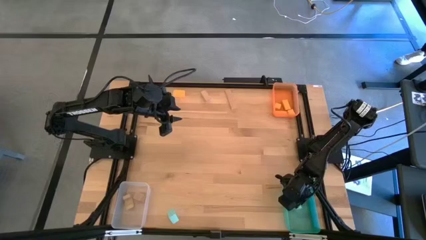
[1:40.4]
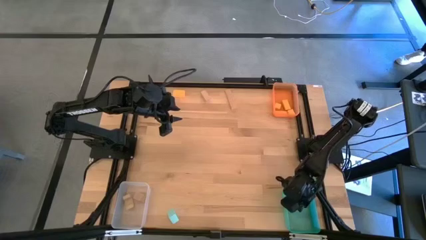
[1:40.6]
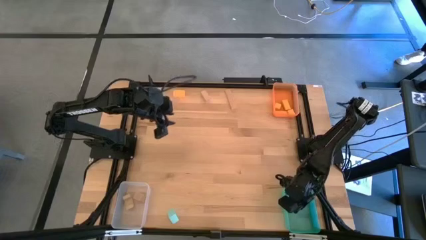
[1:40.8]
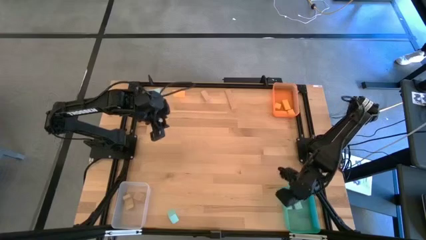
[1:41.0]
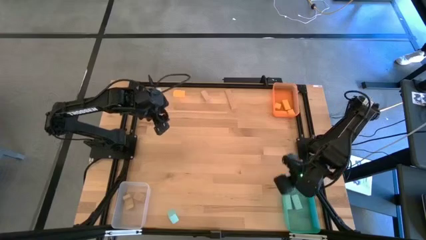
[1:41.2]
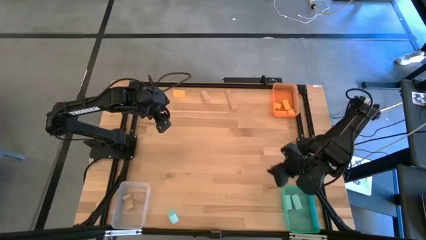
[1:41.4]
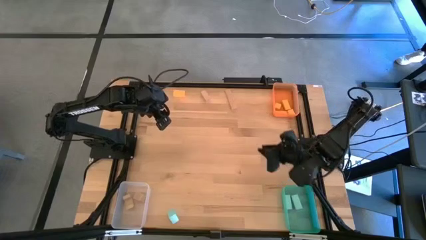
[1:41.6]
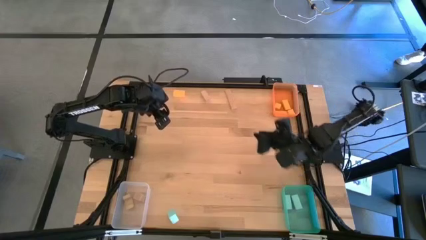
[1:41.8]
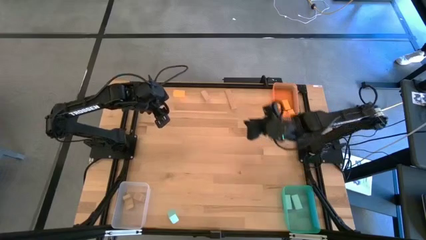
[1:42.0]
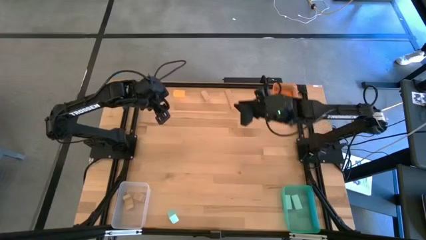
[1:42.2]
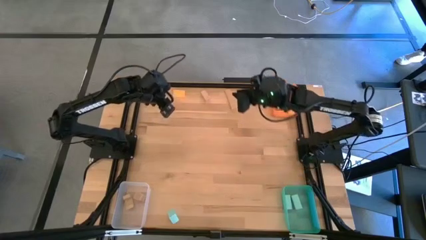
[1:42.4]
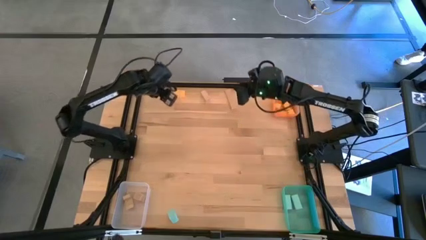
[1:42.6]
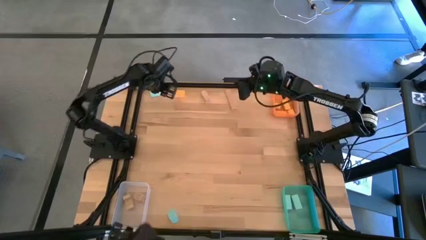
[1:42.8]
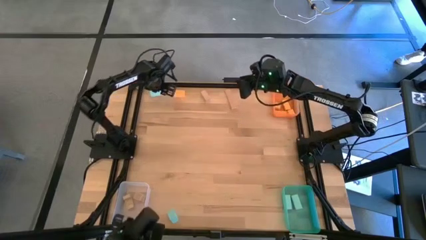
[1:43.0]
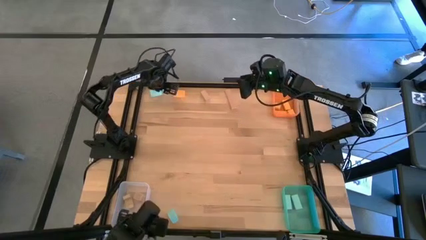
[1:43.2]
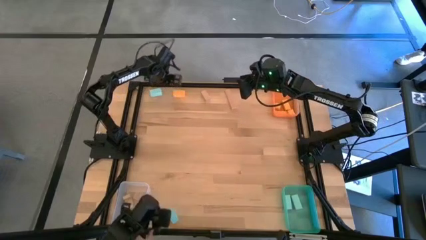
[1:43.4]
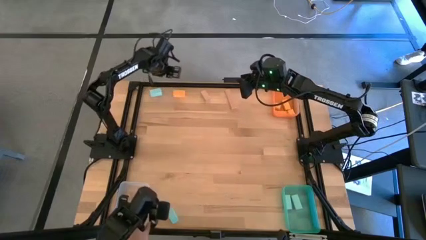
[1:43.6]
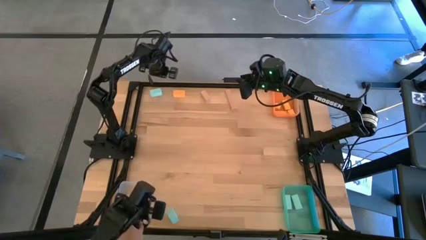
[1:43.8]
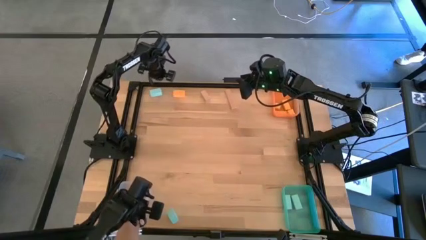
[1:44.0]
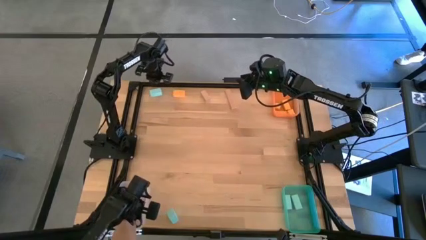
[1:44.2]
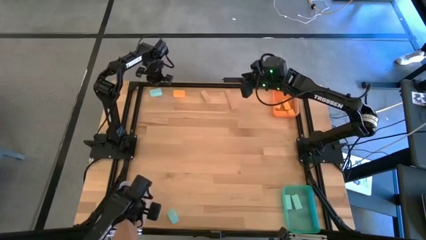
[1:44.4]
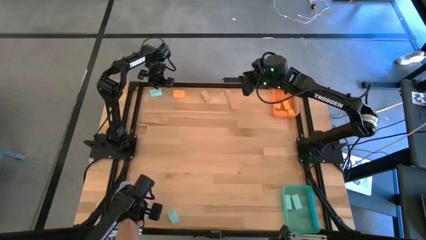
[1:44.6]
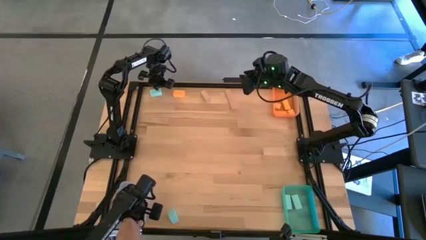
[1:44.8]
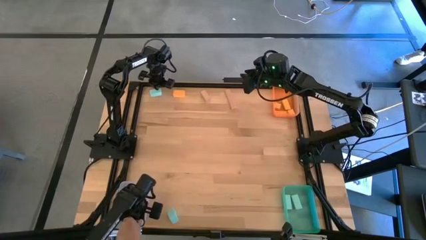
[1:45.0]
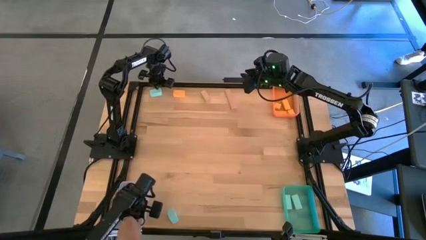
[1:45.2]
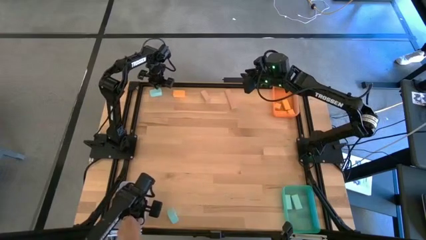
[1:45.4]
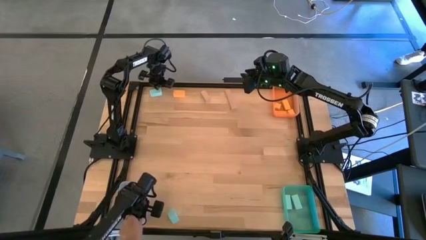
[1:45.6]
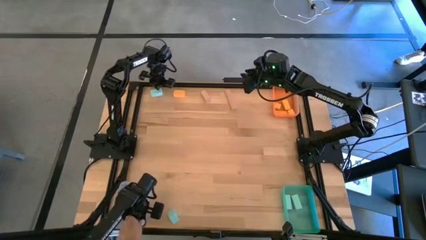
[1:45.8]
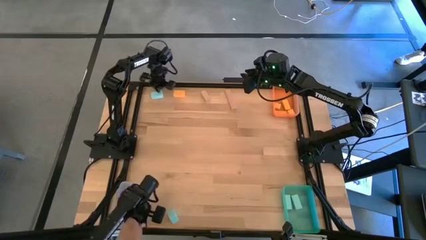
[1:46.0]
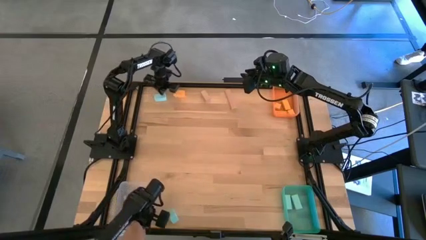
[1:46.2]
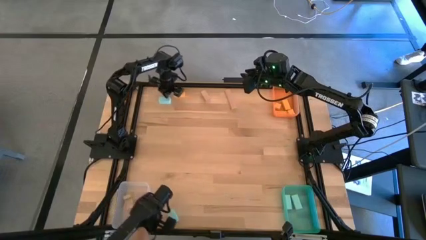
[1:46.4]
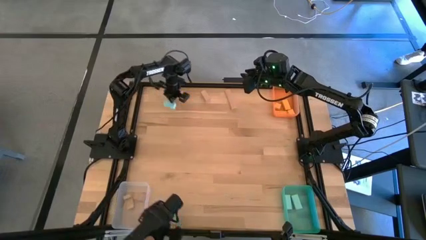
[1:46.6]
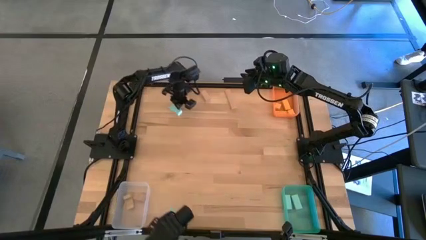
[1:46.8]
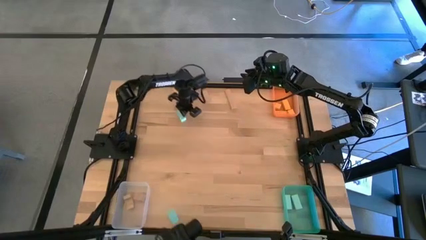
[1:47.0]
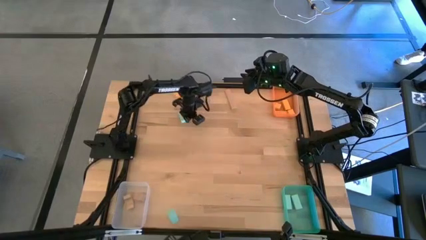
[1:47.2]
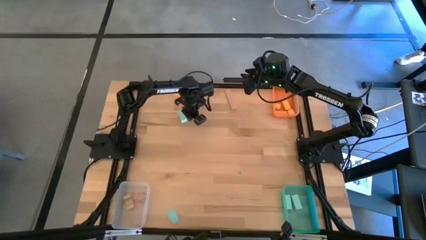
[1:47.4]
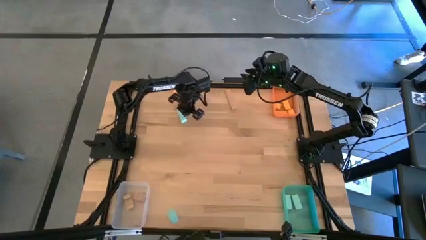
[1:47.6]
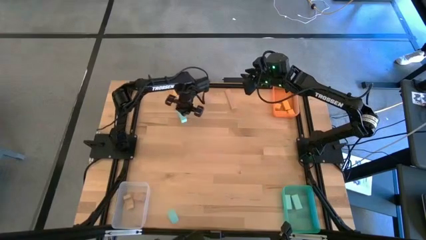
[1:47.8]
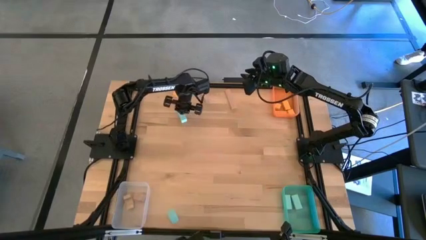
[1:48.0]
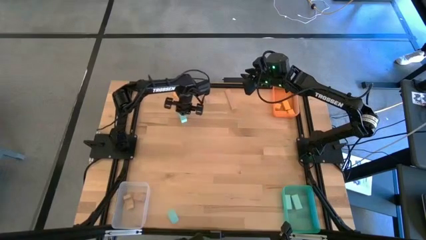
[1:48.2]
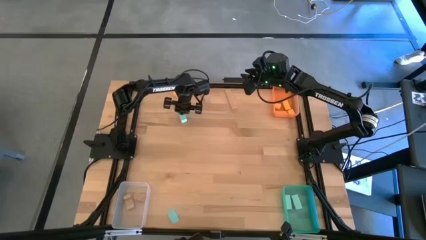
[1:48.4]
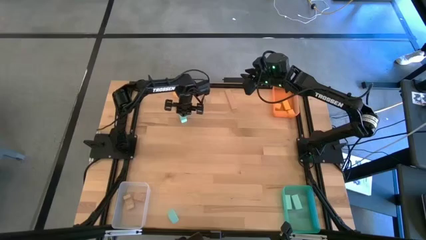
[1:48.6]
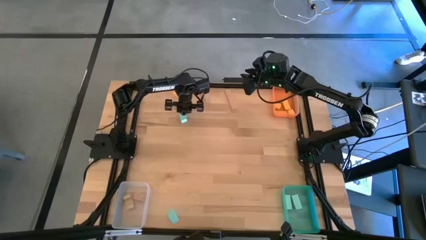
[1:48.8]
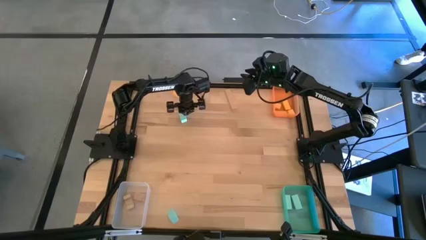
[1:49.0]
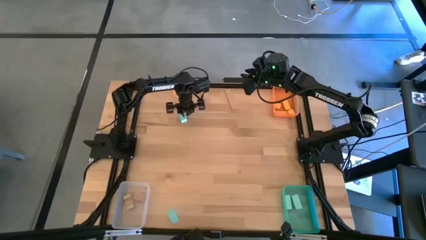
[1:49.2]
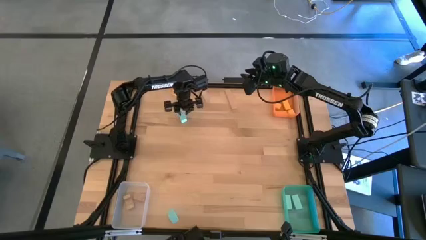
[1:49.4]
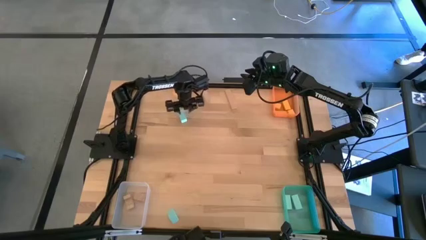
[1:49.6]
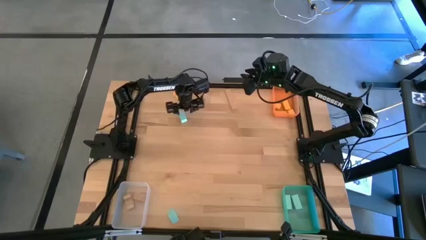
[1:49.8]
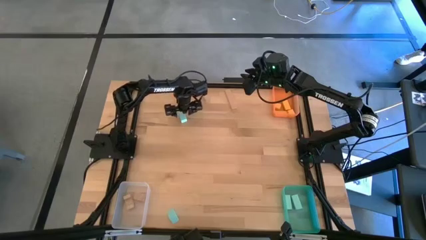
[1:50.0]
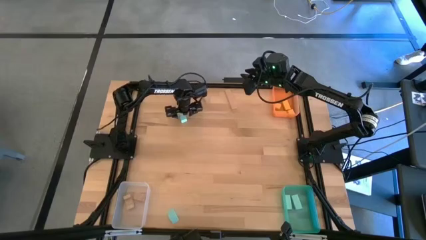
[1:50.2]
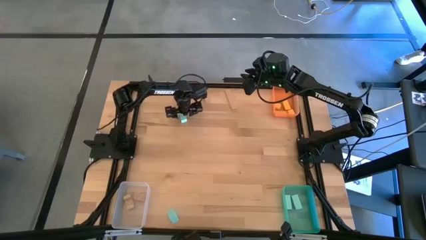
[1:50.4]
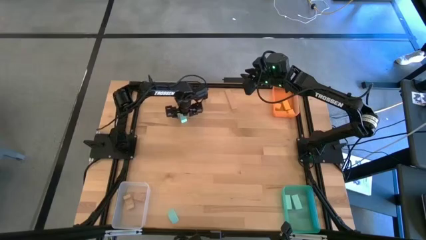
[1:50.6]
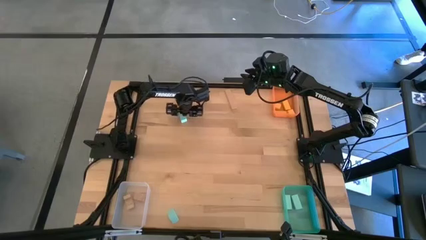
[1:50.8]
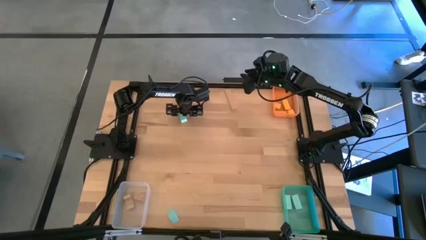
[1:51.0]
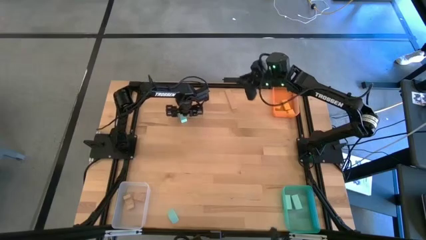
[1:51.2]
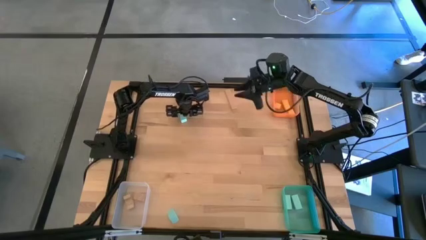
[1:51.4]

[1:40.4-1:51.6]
Task: Sort & place blocks by color
Put the blue block into the green bin

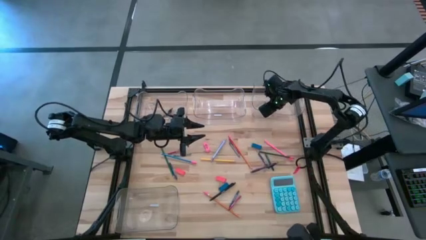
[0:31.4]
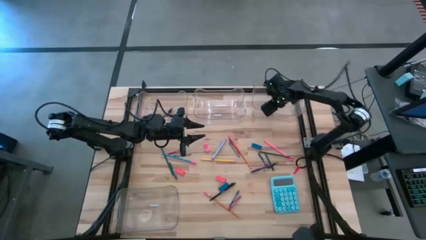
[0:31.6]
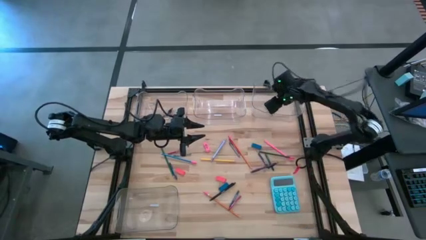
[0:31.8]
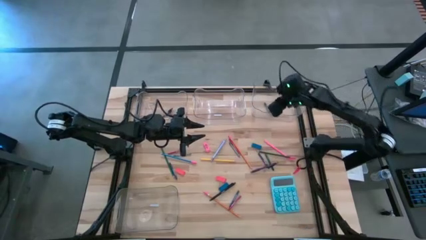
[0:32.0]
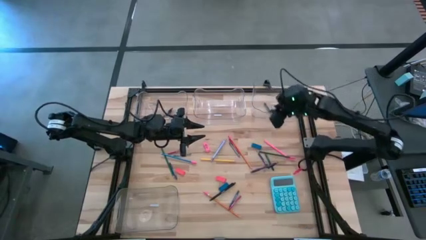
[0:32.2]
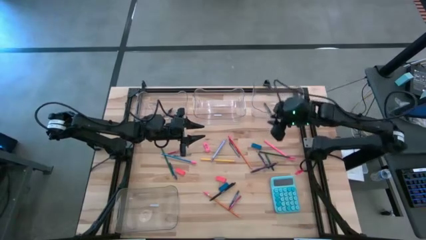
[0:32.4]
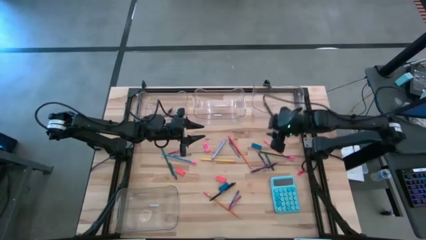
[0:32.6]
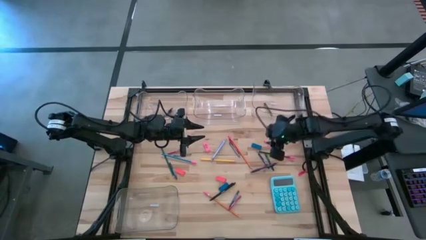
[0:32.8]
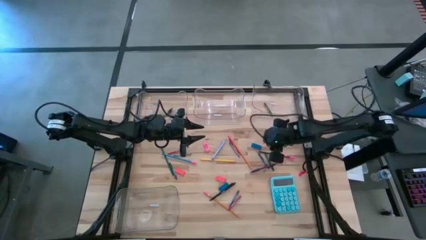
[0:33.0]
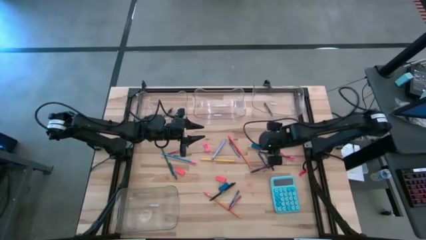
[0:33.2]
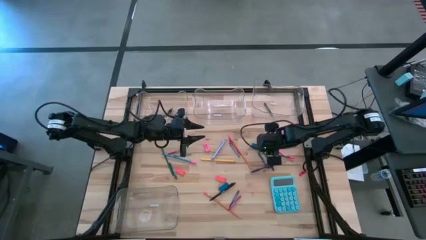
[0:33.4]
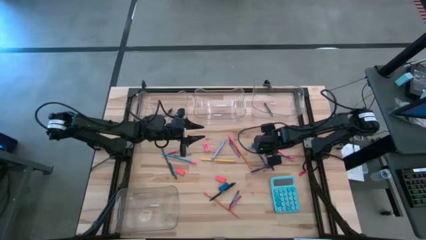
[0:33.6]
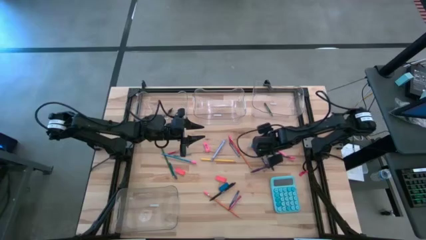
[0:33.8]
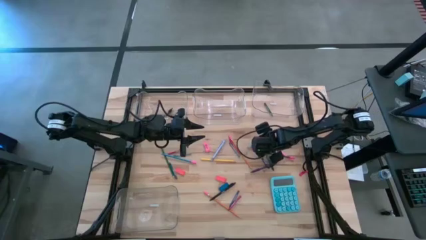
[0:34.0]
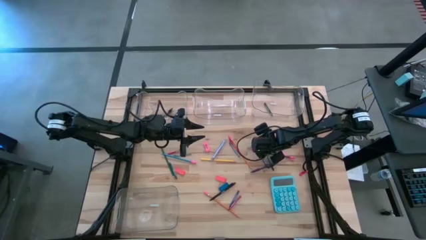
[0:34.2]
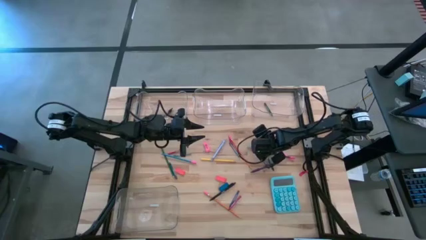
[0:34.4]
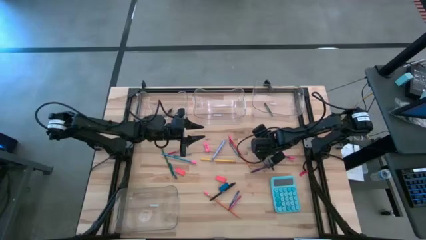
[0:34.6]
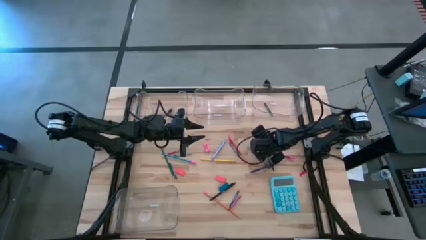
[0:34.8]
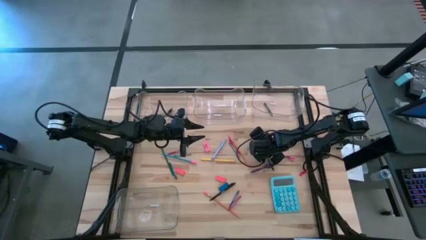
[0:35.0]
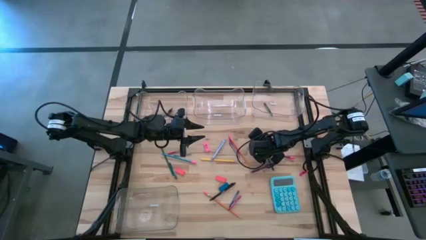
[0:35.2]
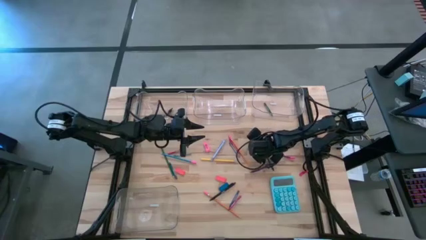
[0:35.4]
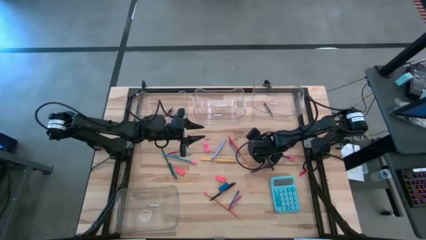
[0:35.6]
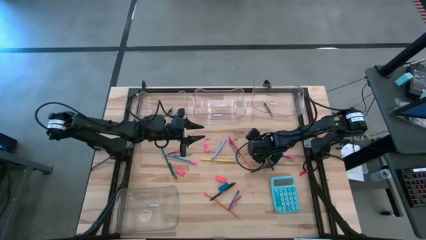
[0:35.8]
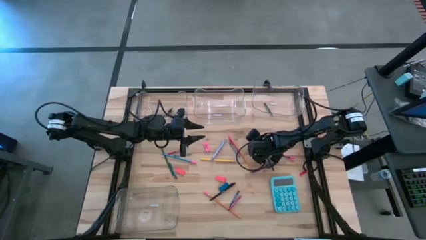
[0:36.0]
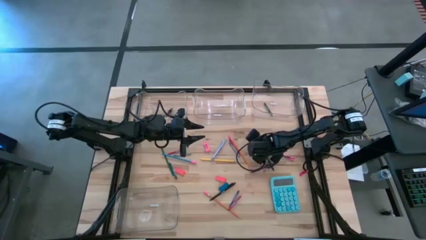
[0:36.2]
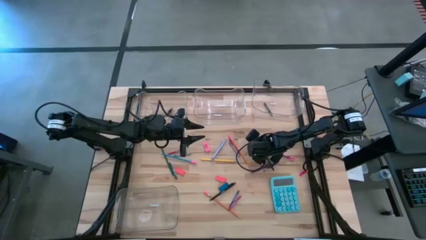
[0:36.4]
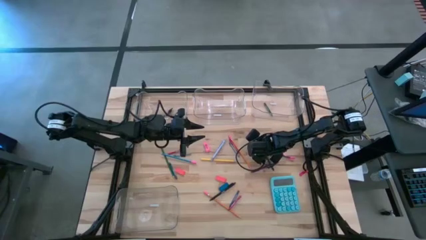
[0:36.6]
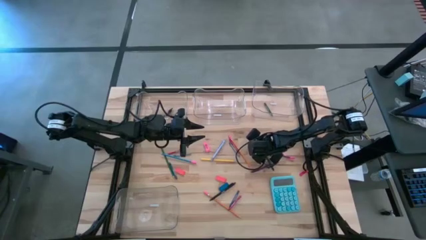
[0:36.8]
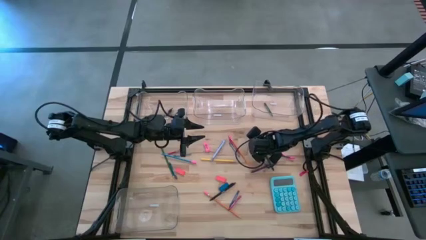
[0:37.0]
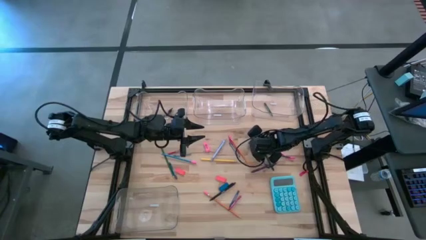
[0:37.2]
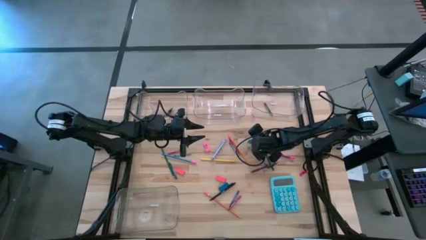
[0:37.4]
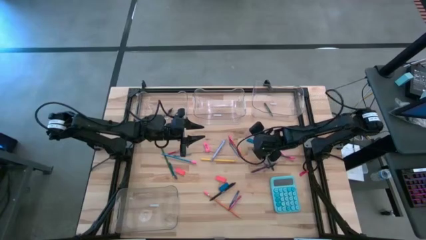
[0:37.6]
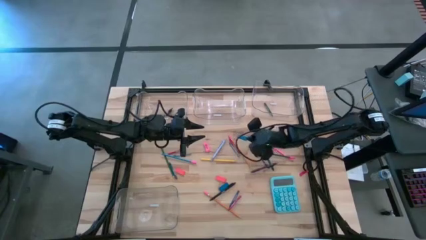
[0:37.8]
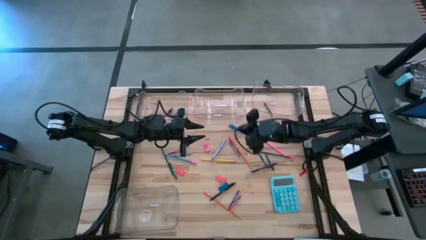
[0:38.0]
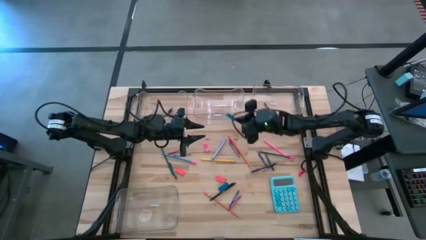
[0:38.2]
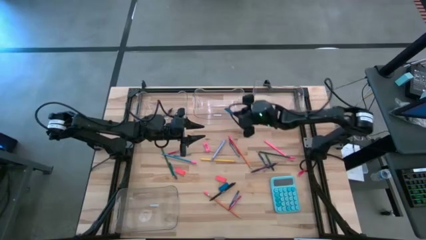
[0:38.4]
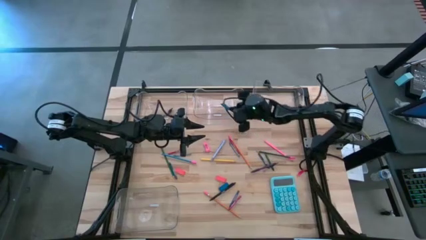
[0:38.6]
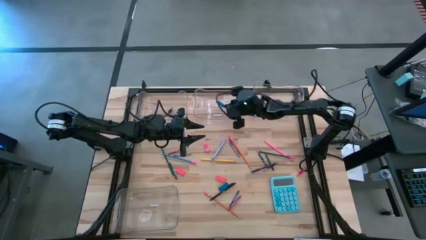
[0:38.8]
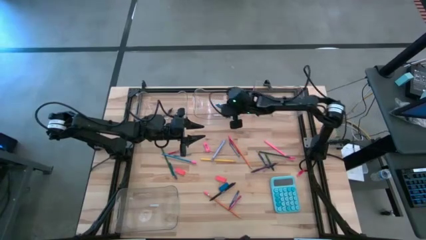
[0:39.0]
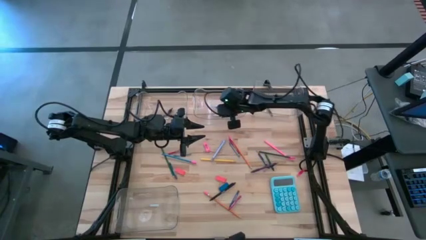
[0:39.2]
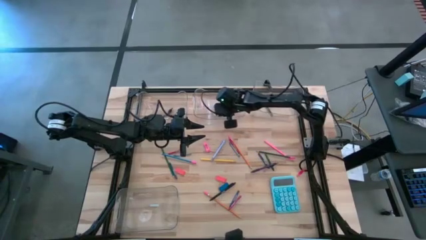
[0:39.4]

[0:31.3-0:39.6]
Task: Sort crayons/erasers/pens/pencils in bins
Put the blue eraser into the top middle transparent bin
